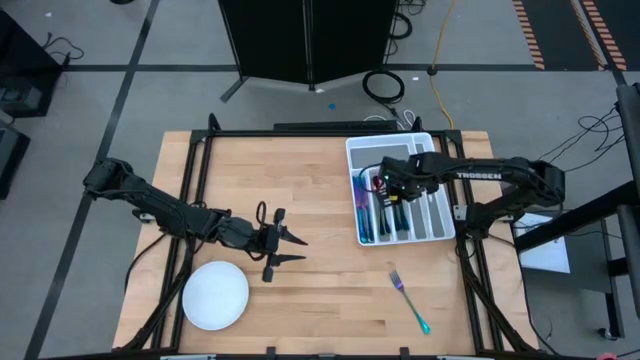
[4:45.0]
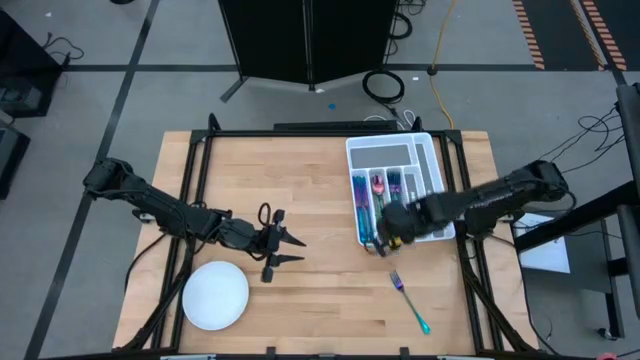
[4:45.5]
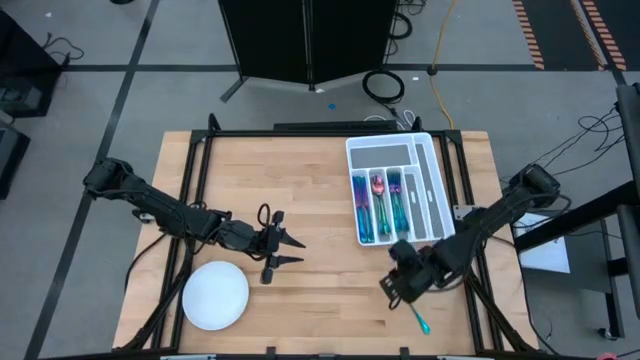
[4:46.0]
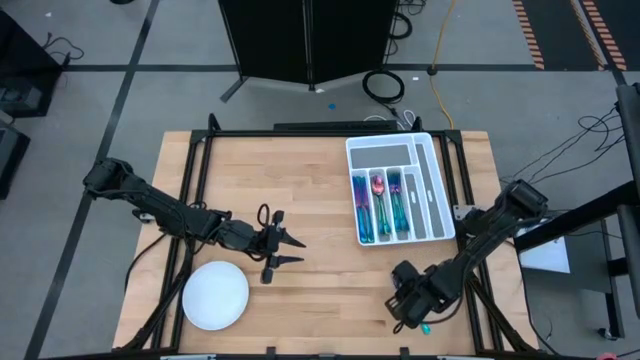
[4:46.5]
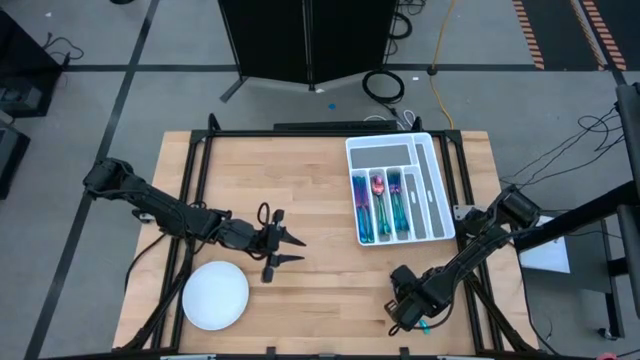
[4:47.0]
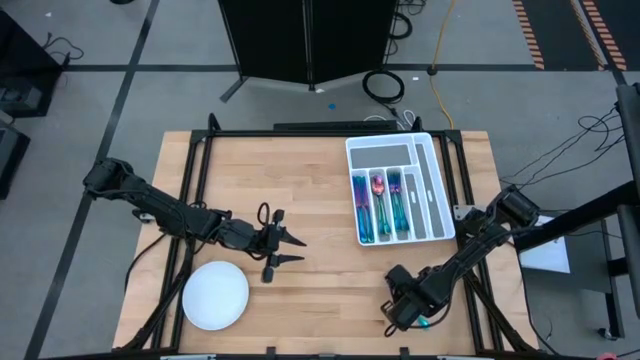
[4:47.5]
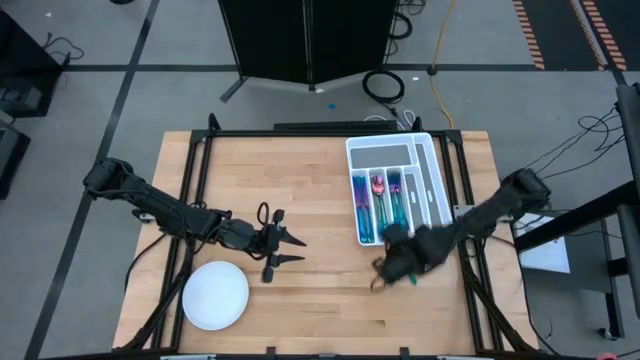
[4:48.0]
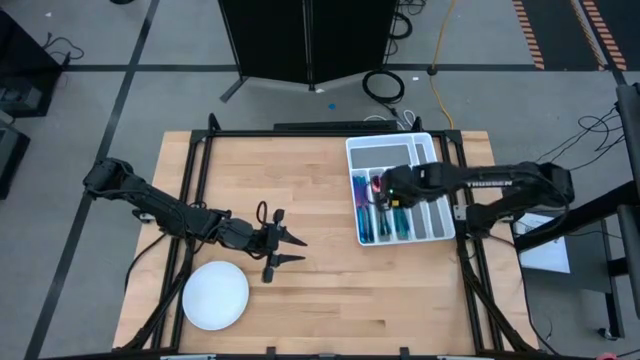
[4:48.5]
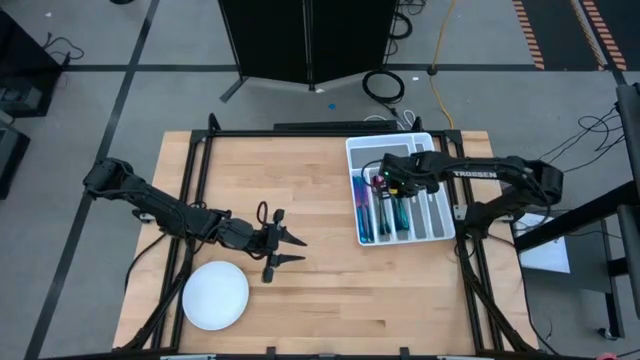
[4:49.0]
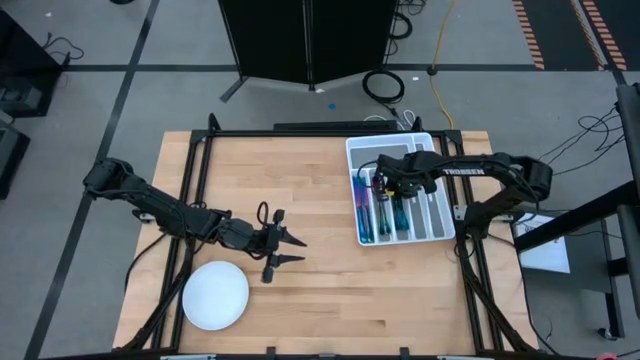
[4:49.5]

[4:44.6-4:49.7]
Task: Sort silverware
Put the blue fork into the utensil organizer

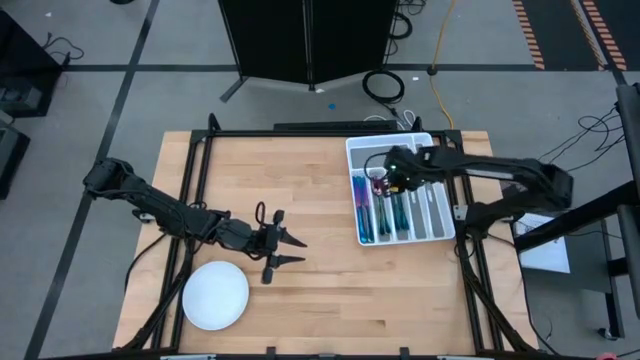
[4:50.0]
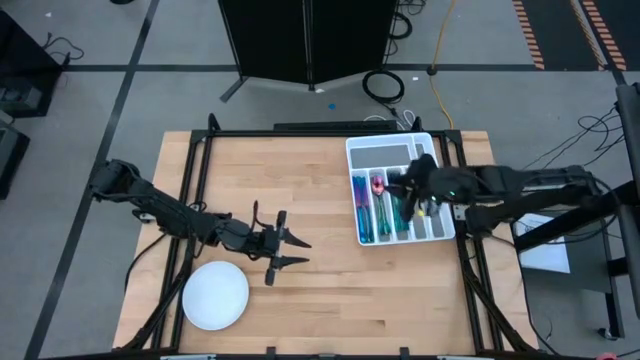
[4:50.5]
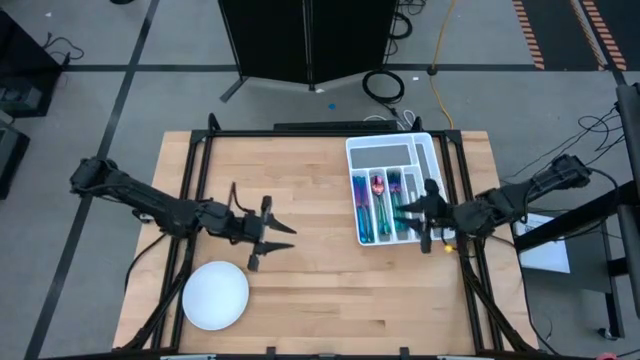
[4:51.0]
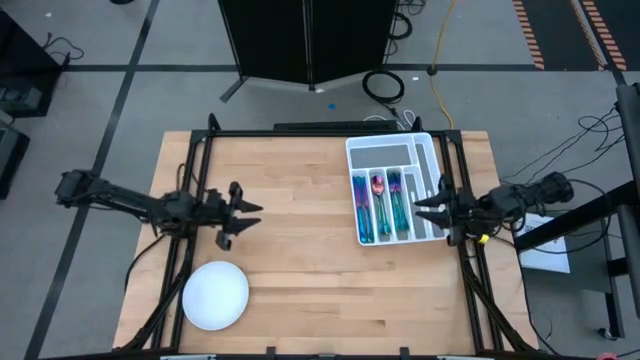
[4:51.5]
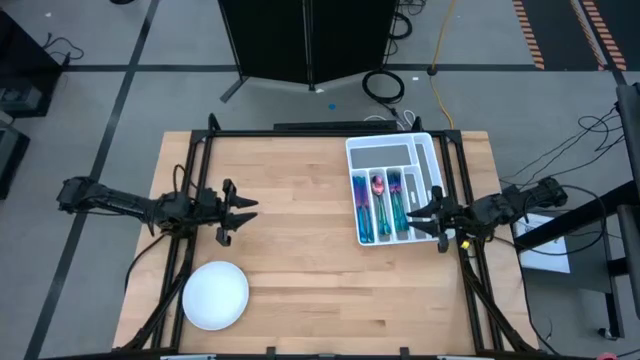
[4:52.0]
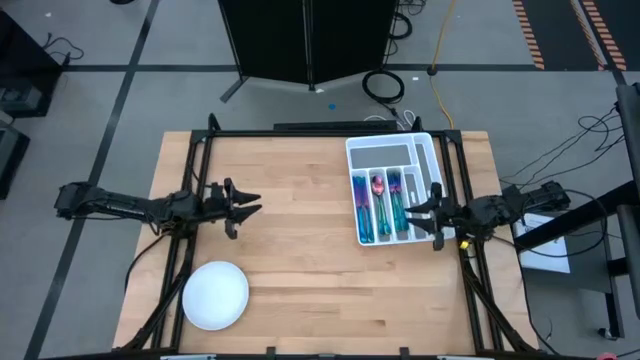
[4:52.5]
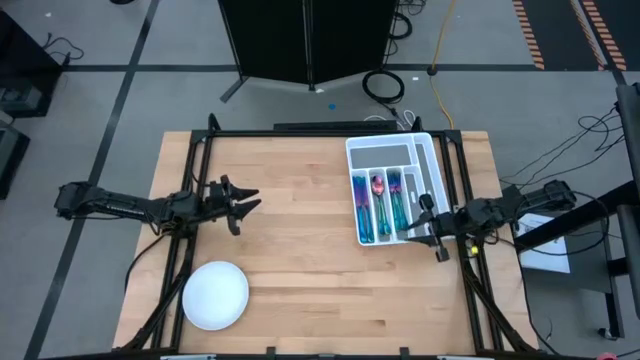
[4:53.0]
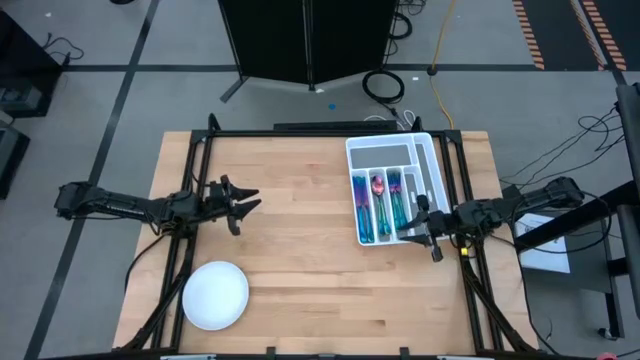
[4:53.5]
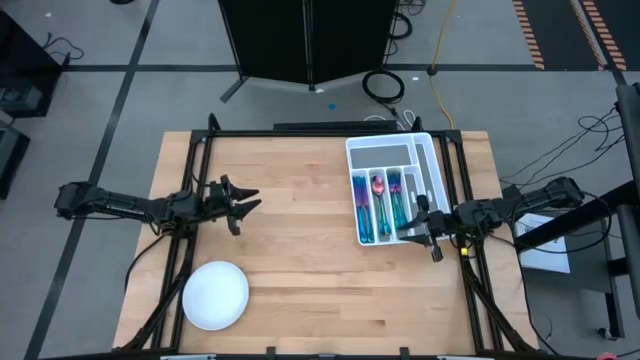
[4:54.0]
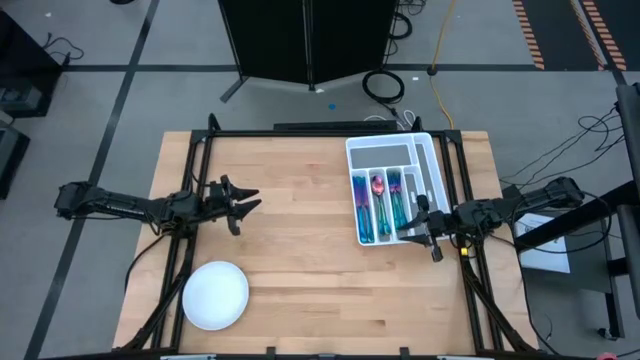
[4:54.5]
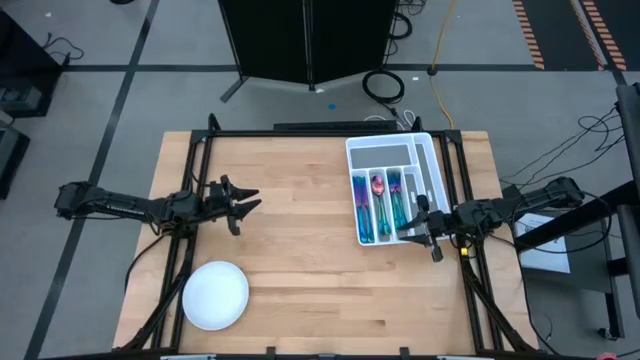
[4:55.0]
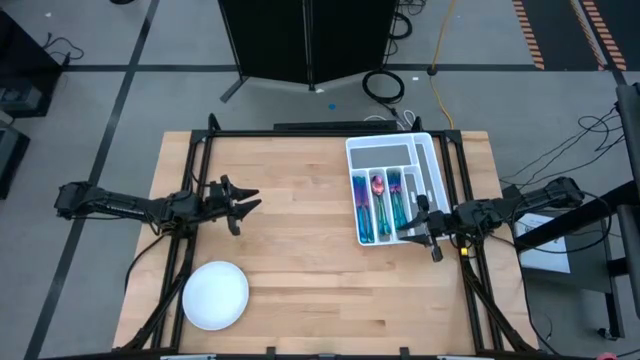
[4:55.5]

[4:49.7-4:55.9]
Return to Home Position

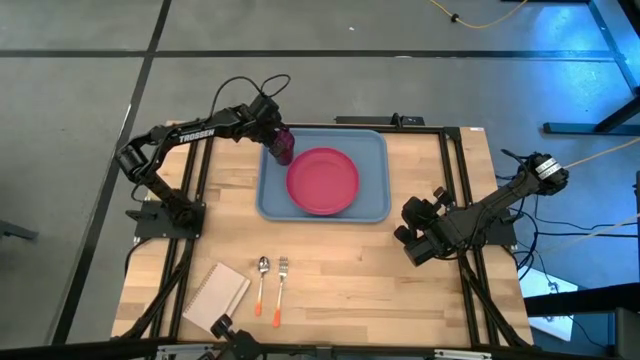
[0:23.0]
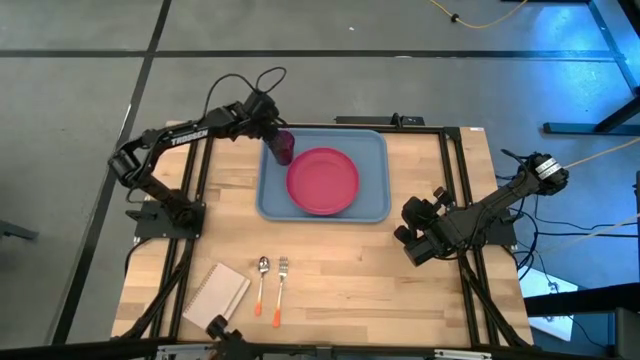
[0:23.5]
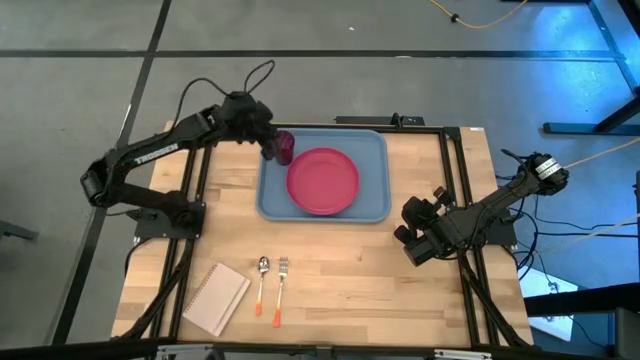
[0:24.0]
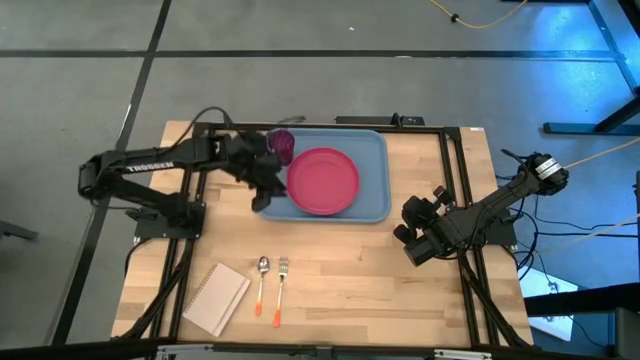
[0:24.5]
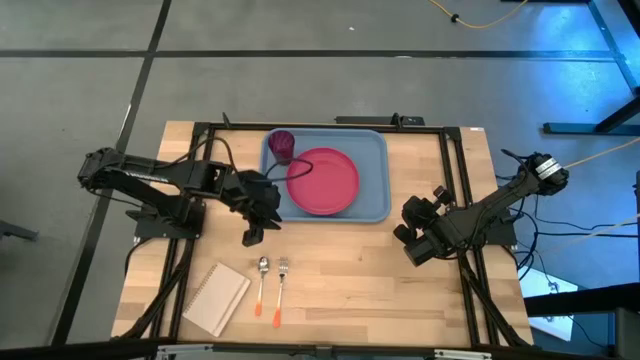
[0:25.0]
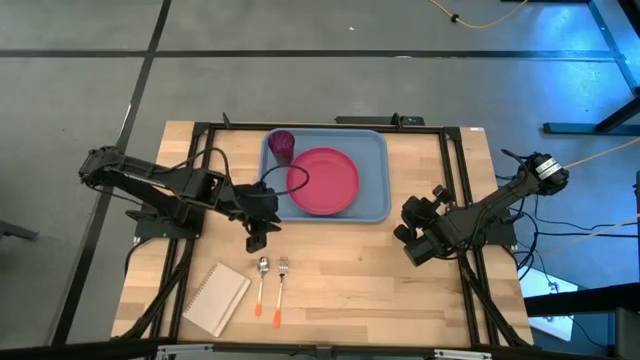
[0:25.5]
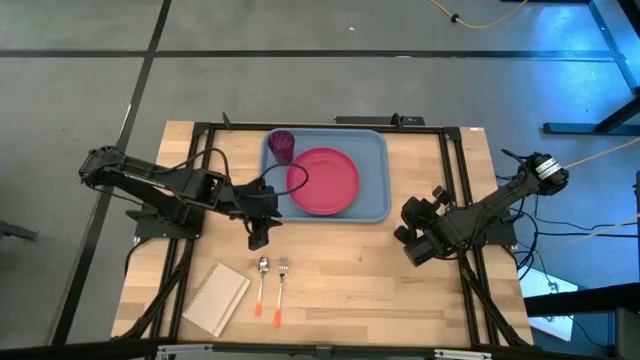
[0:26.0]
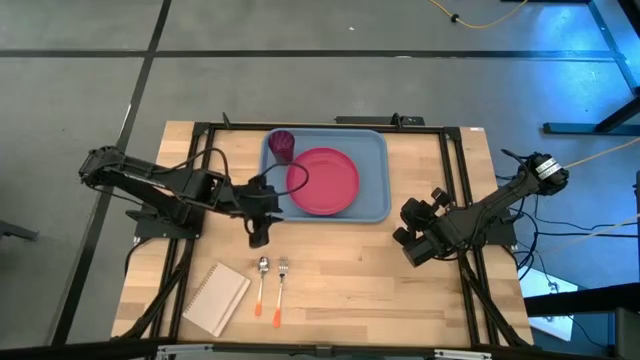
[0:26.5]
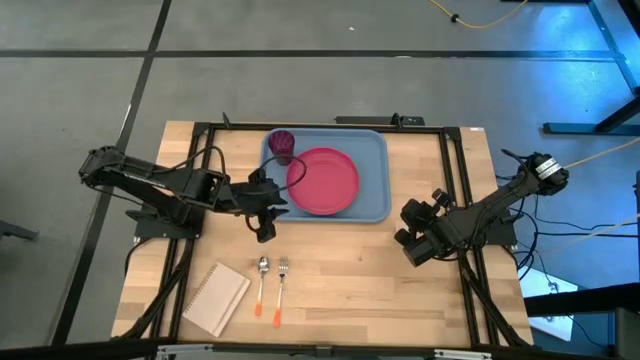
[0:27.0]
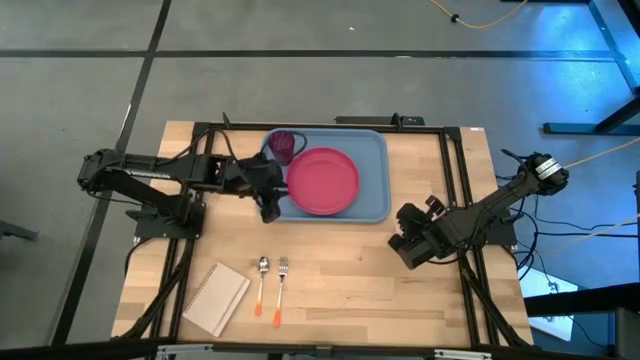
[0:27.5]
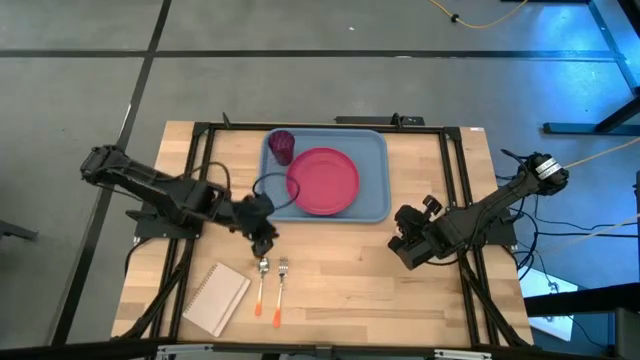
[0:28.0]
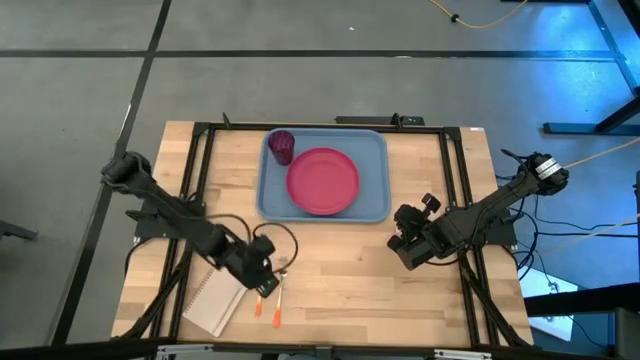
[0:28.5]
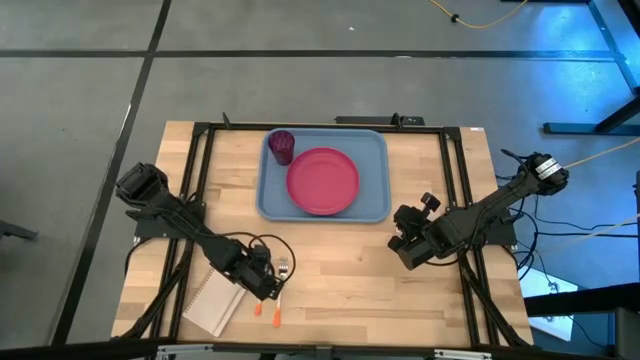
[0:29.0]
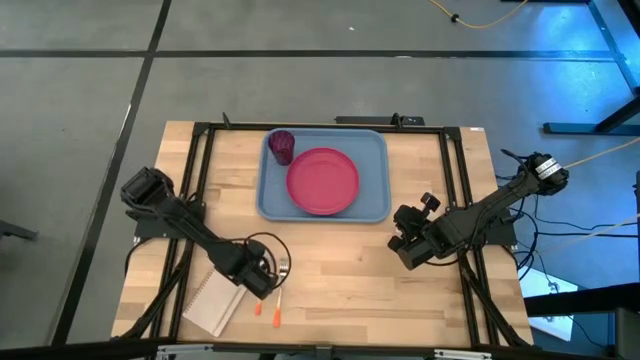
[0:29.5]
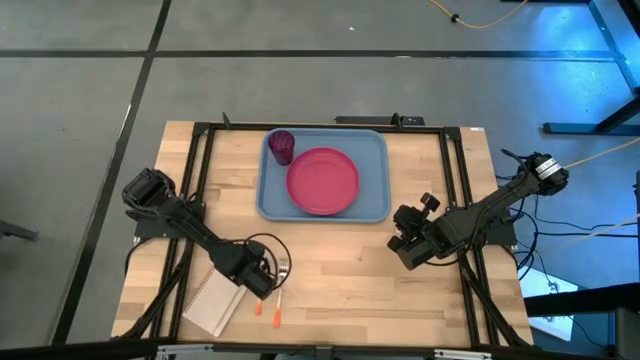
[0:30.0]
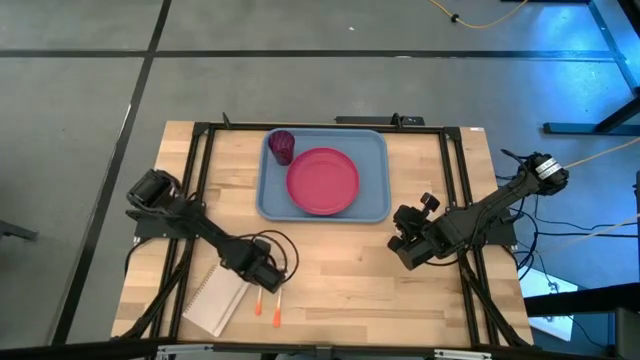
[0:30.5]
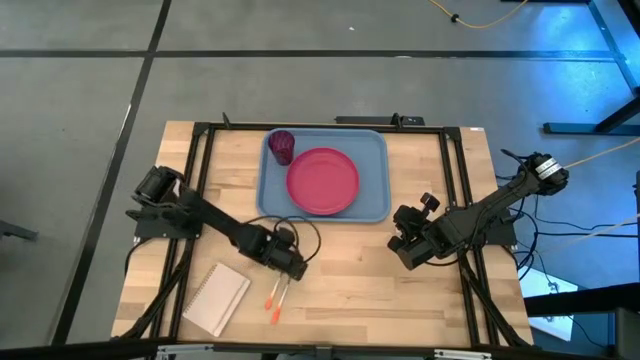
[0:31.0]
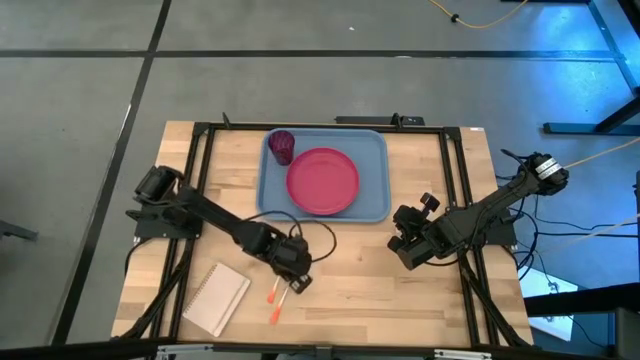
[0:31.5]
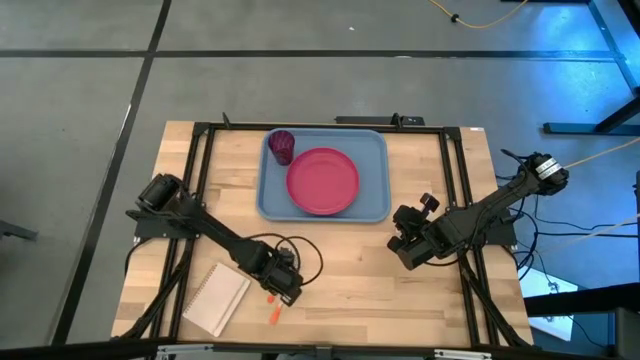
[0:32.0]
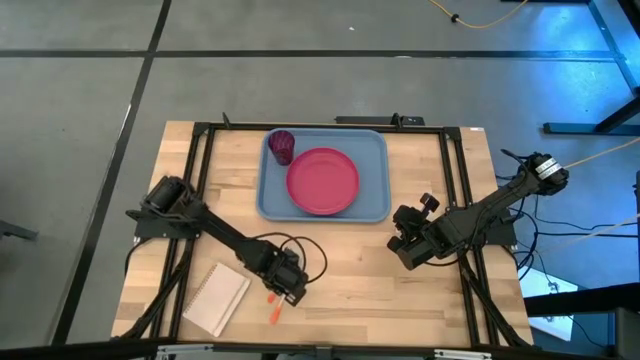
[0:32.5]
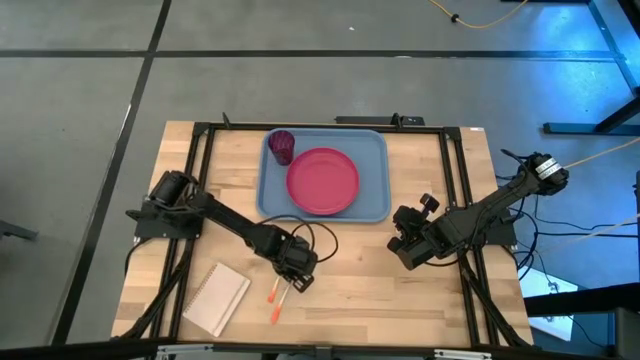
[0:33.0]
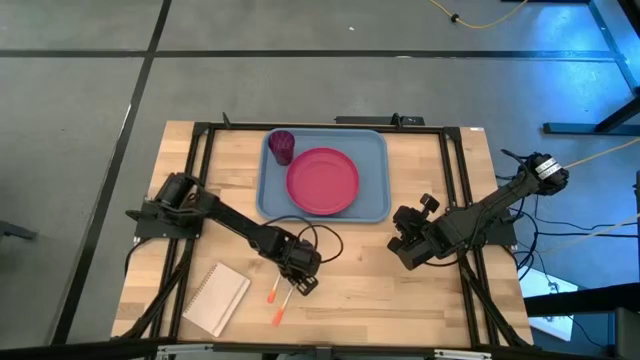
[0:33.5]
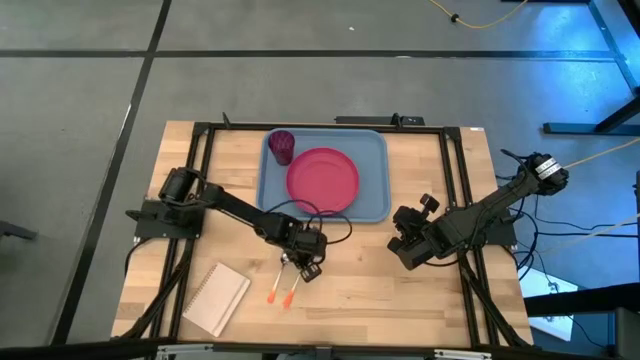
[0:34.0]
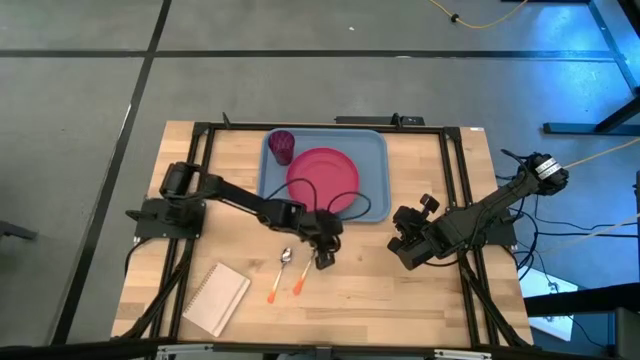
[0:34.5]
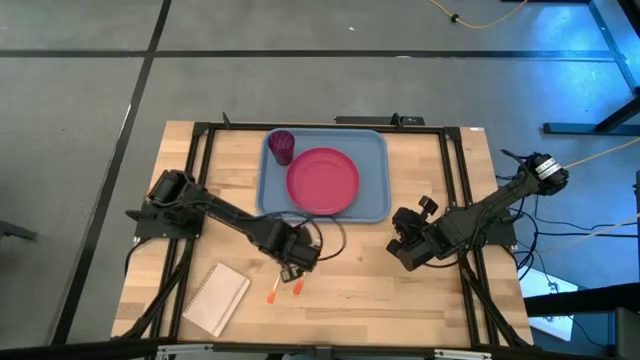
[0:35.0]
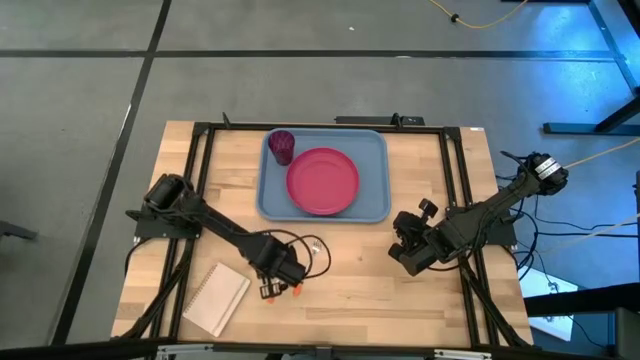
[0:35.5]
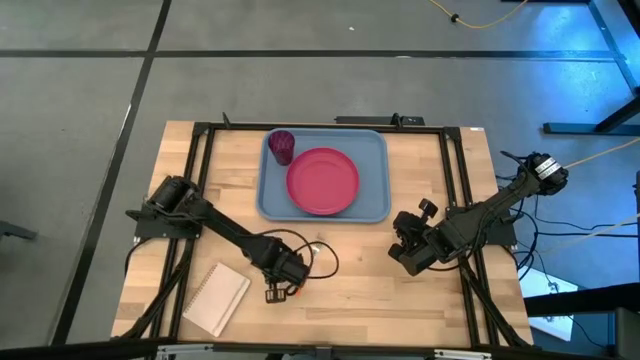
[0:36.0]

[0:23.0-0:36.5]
Task: Pick and place plate/cup/fork/spoon on tray
Adjust the orange spoon and the orange fork
